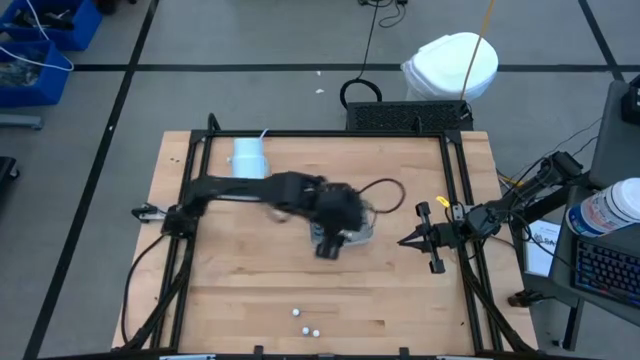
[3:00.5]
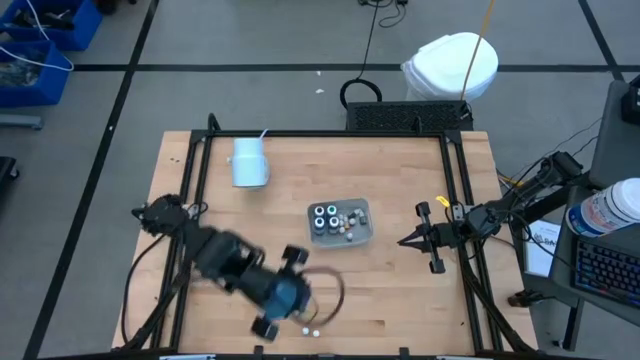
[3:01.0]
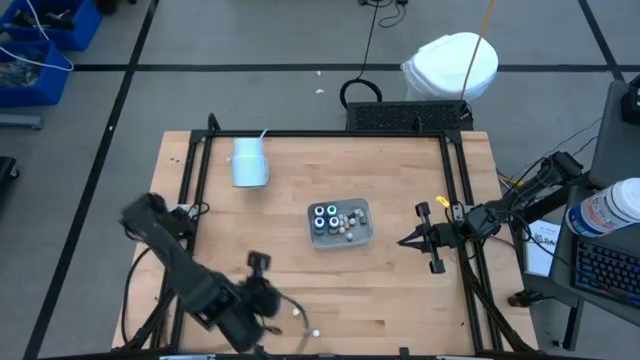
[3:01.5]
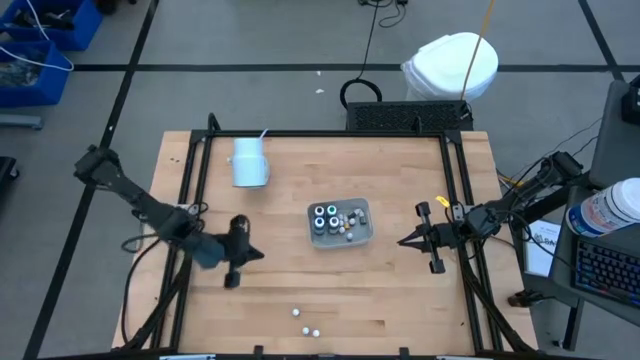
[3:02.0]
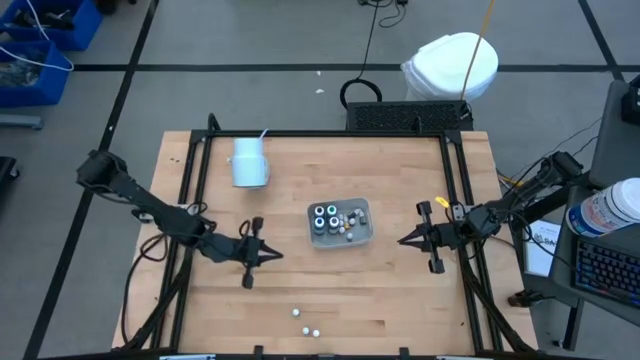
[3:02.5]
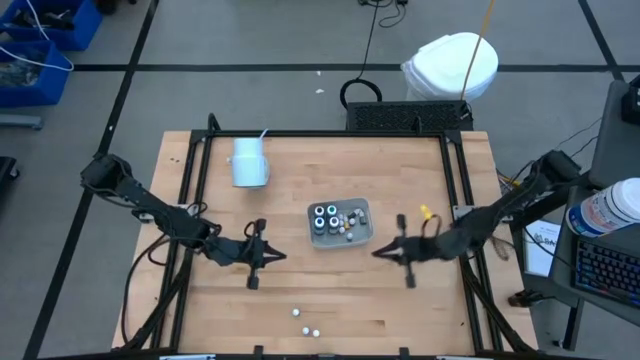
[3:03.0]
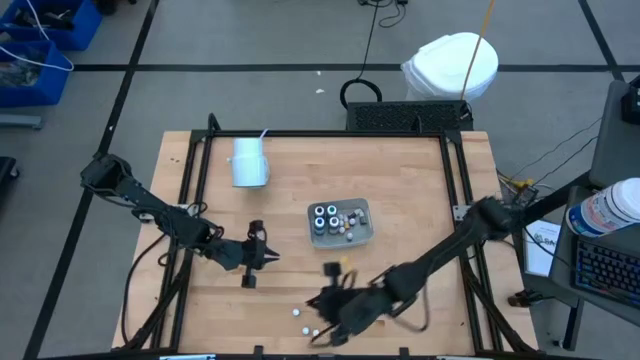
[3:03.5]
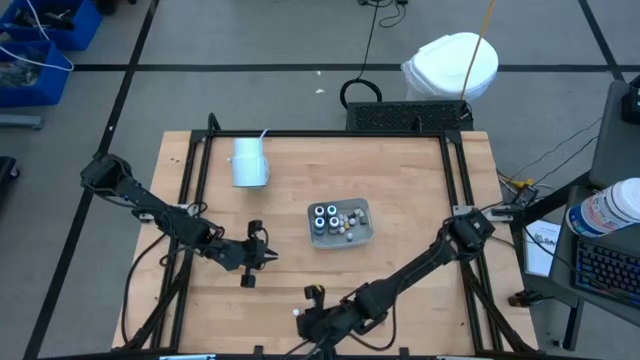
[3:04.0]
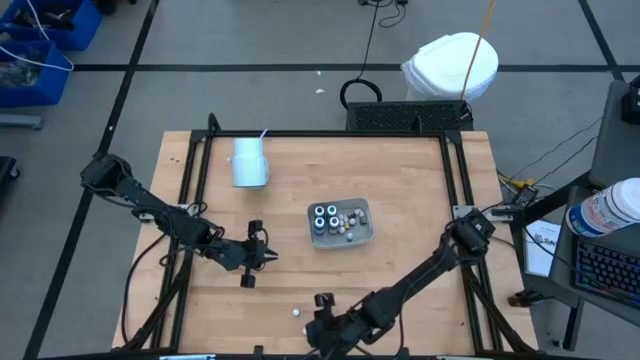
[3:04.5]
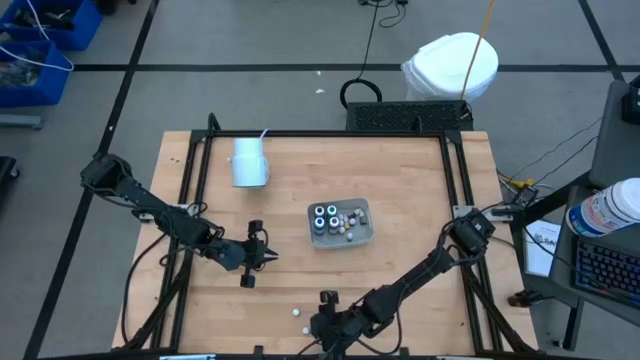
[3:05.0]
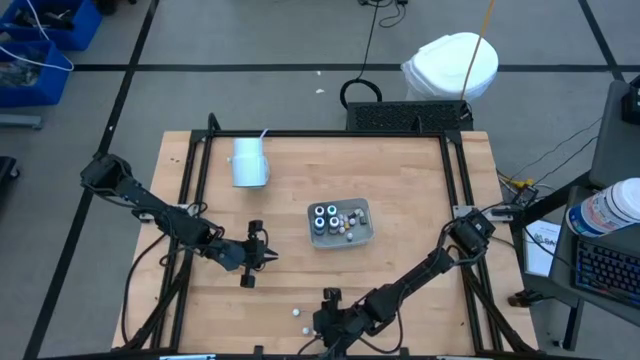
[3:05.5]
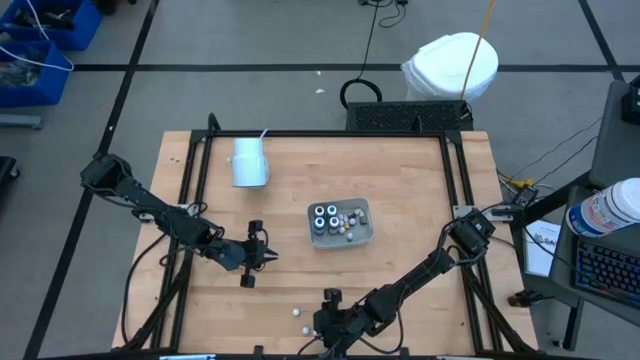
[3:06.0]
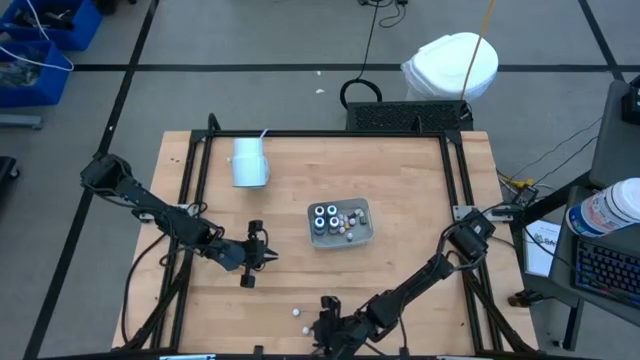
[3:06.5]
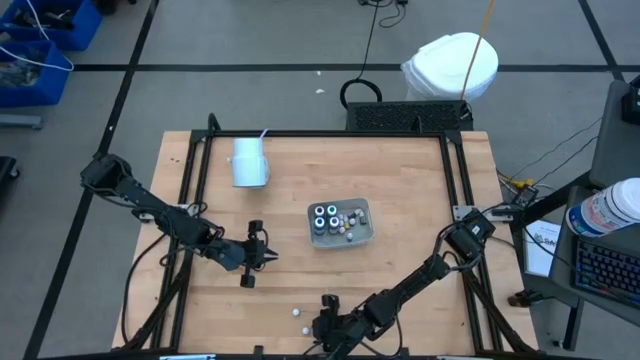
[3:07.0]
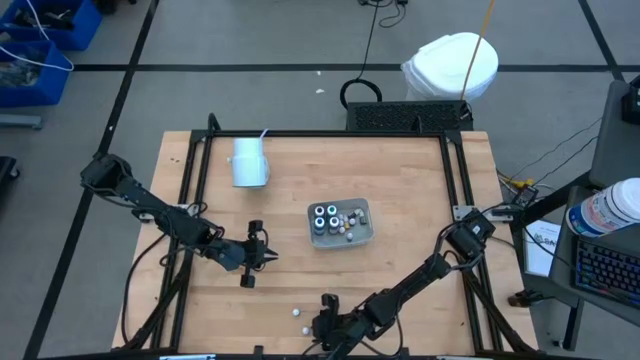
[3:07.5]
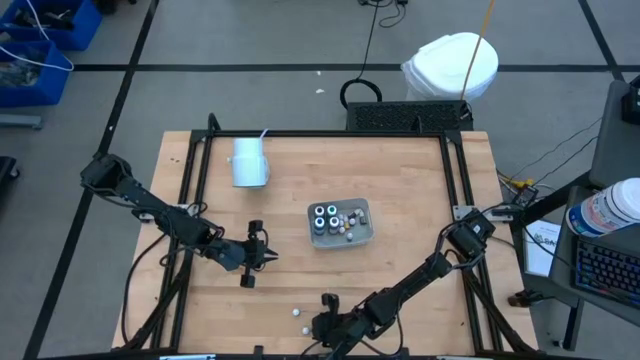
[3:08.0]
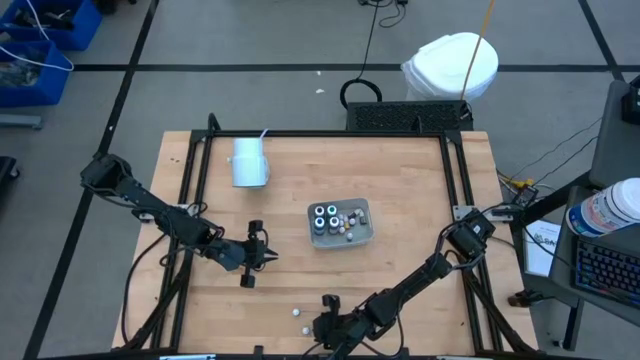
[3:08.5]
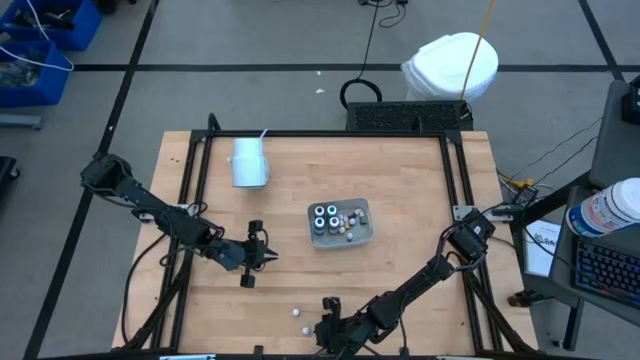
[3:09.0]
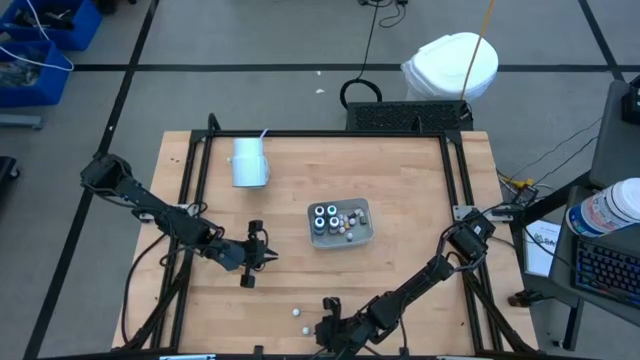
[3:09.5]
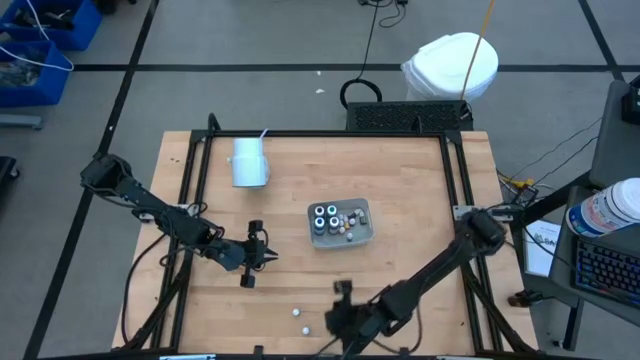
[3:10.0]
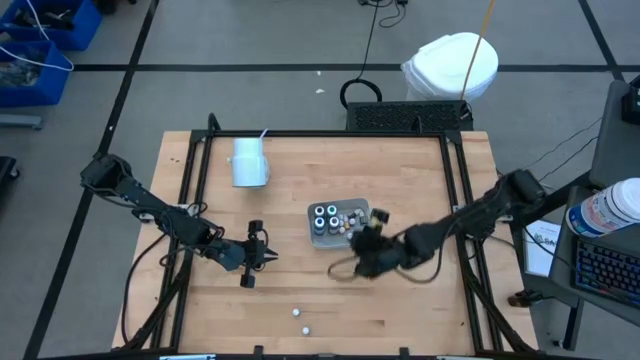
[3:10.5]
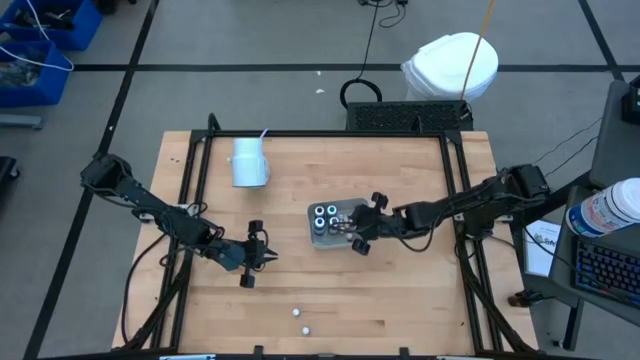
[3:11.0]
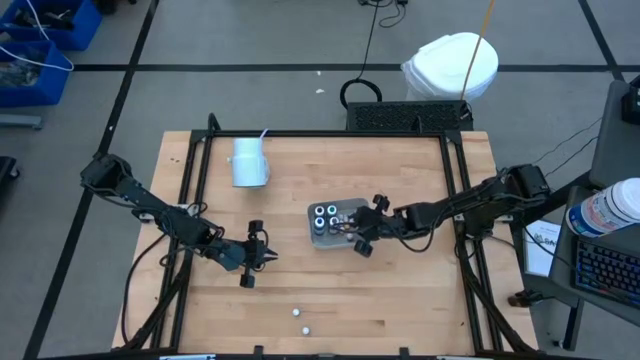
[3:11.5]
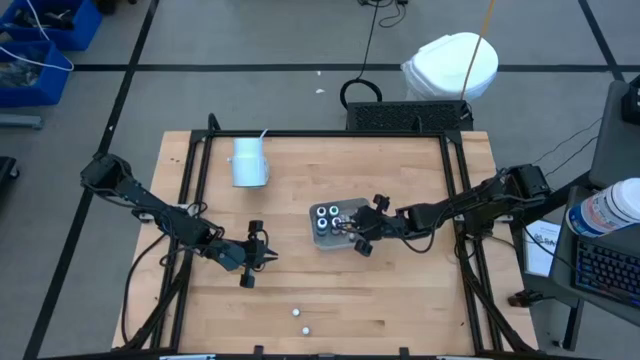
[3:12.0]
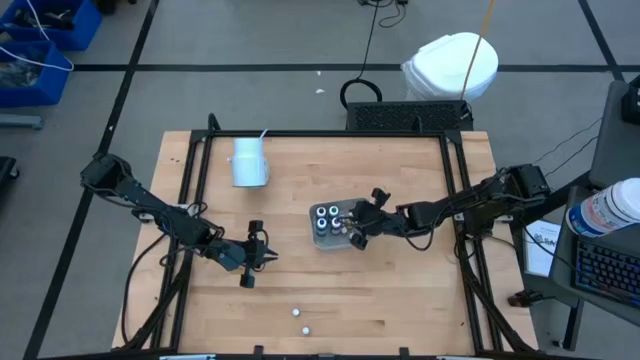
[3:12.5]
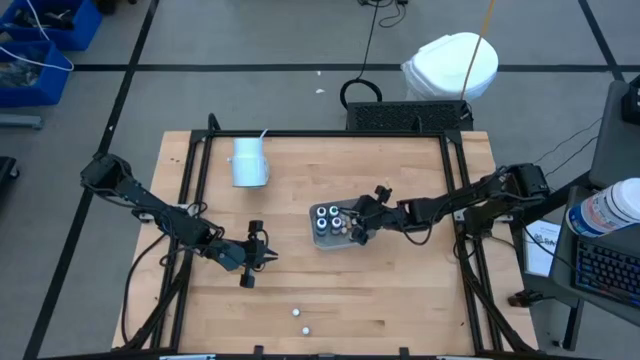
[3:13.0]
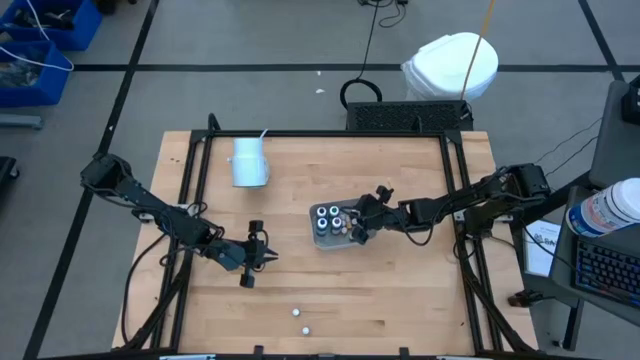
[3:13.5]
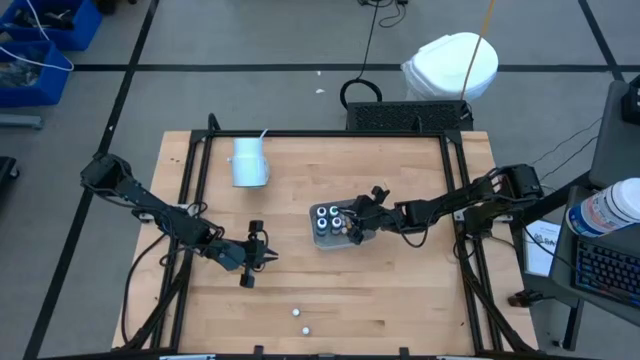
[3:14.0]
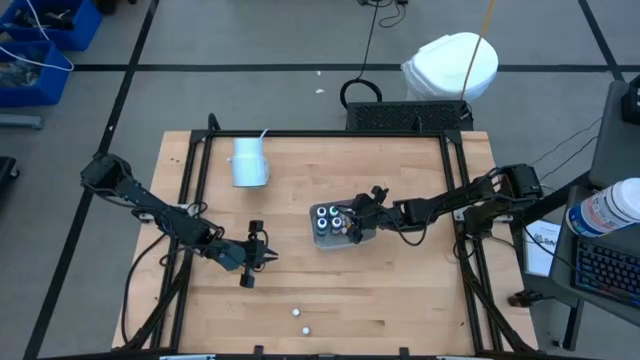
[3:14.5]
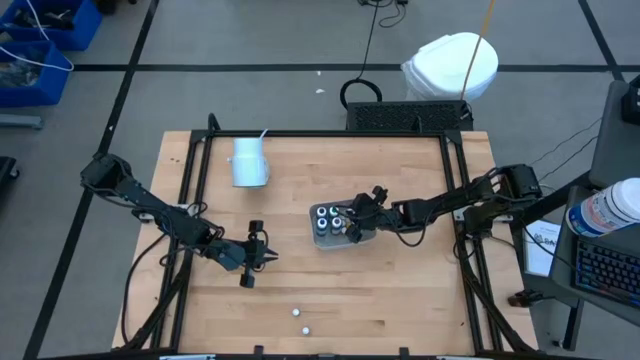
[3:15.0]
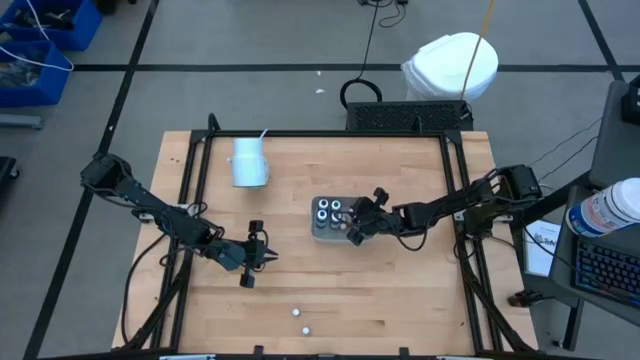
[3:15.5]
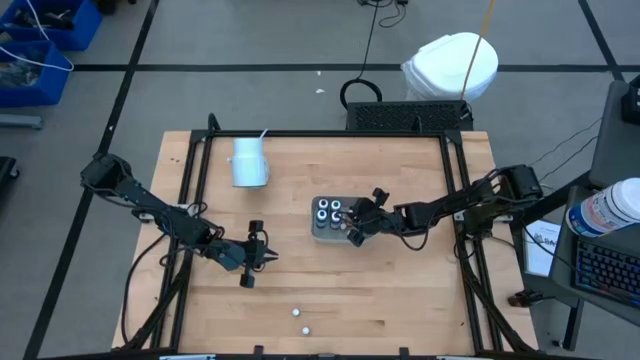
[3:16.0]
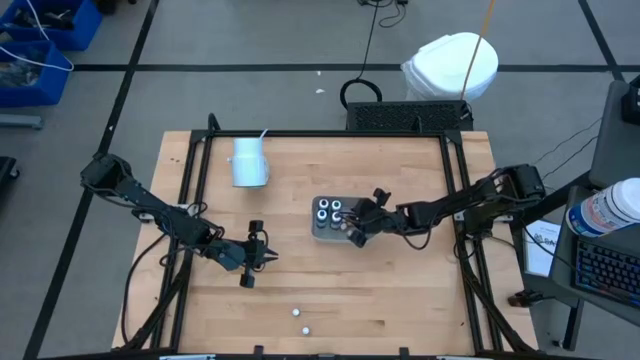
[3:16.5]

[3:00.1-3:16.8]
Task: Pick & Place food coloring
Put the small orange food coloring bottle into the white container

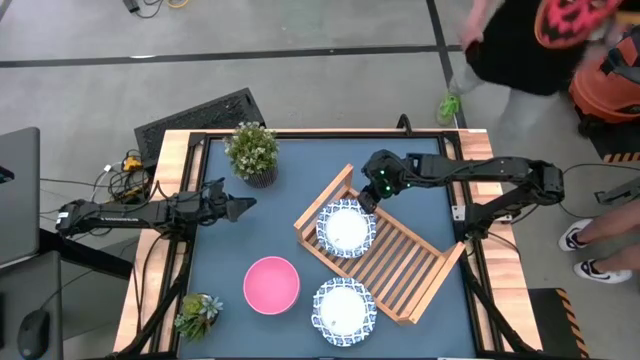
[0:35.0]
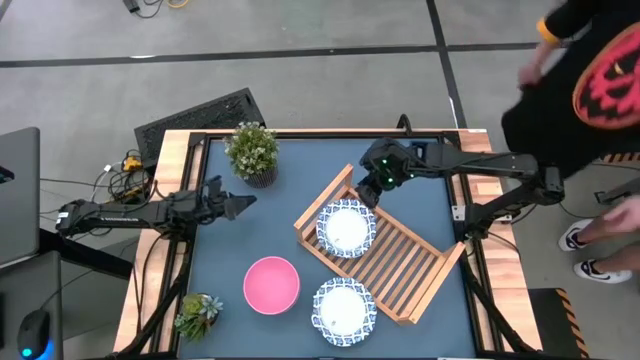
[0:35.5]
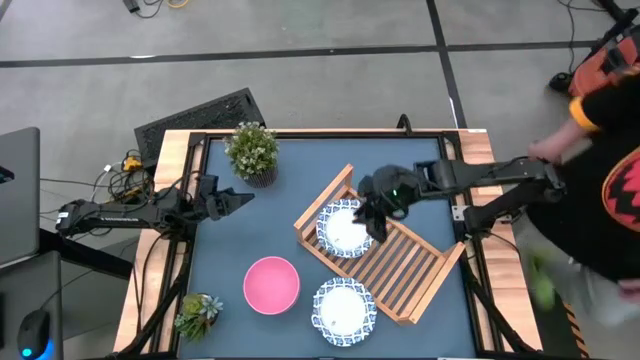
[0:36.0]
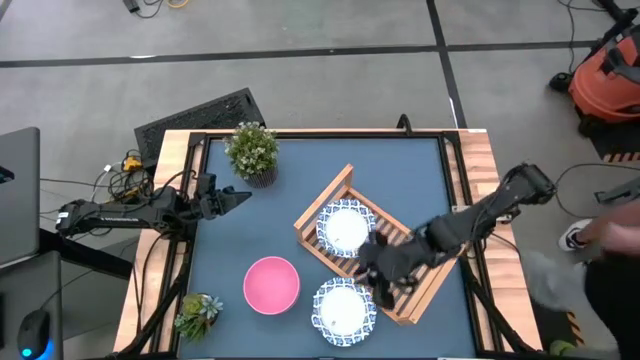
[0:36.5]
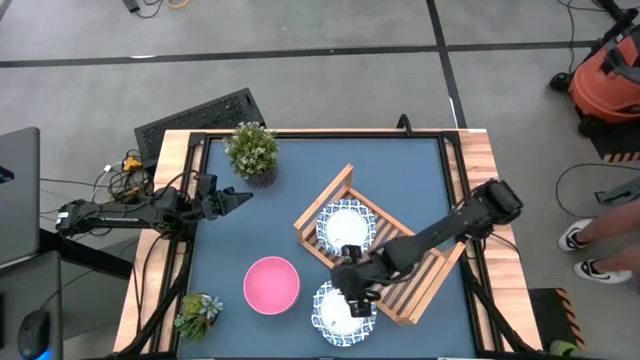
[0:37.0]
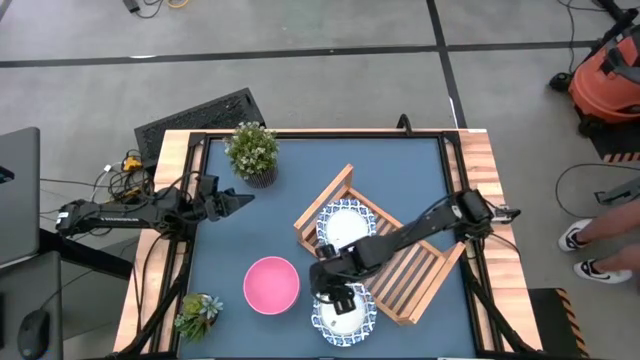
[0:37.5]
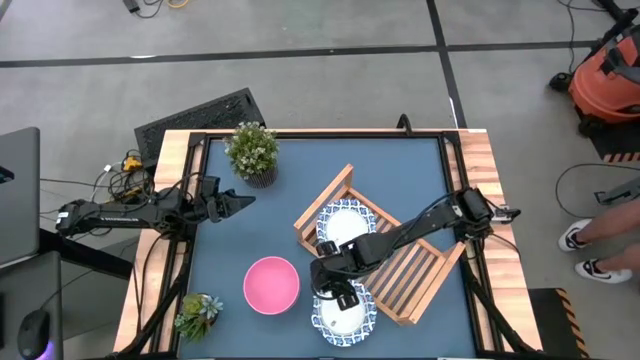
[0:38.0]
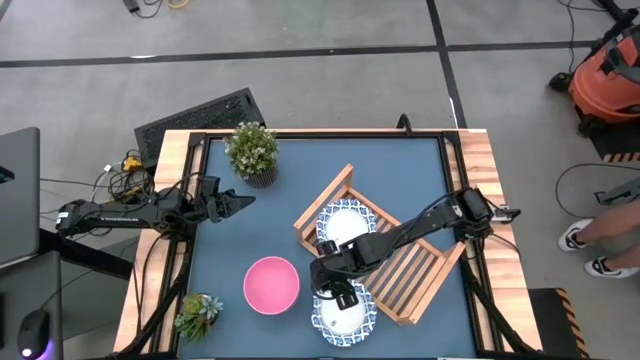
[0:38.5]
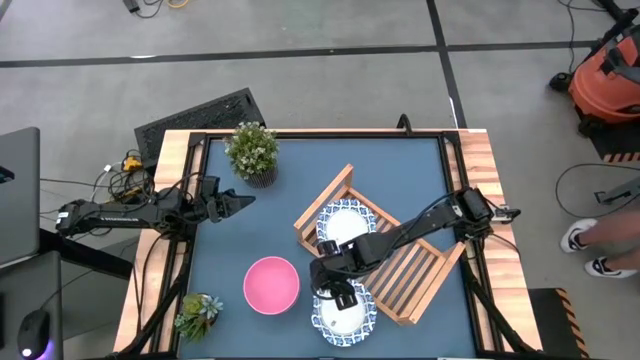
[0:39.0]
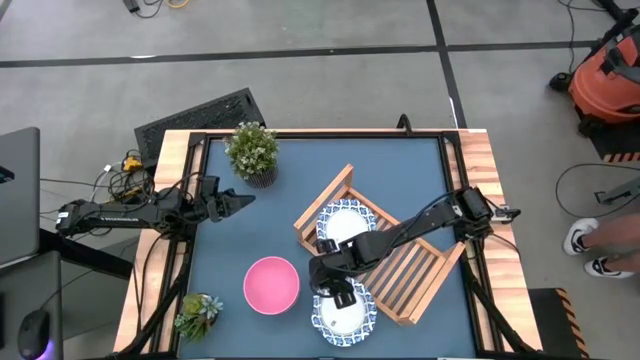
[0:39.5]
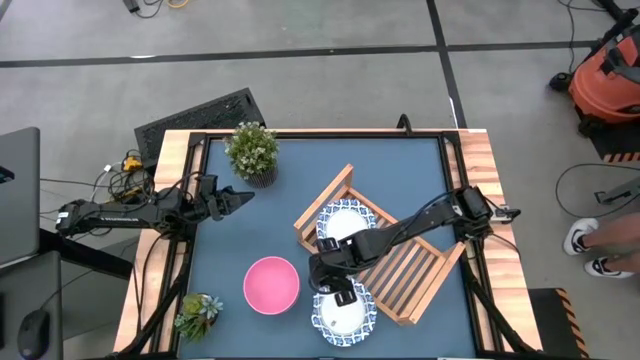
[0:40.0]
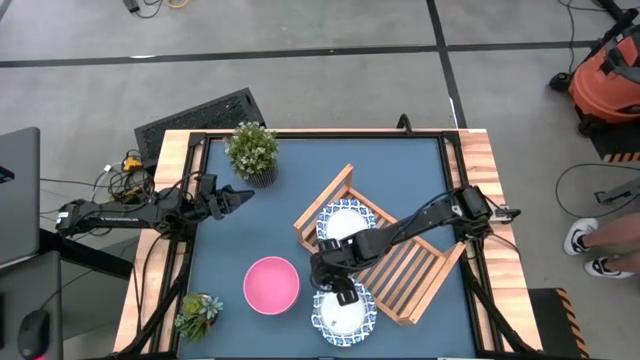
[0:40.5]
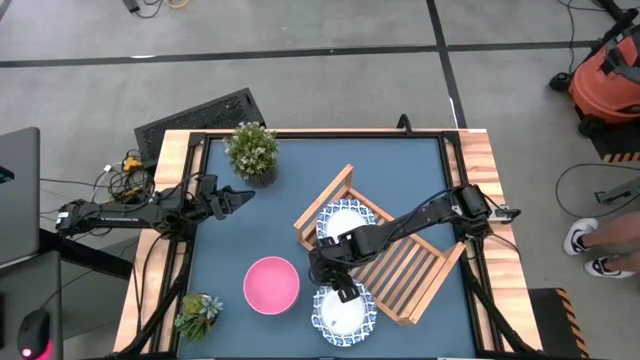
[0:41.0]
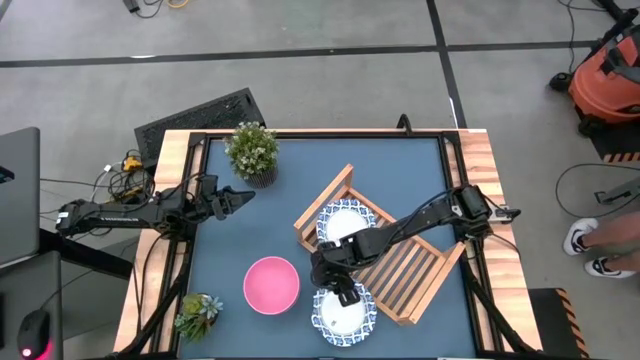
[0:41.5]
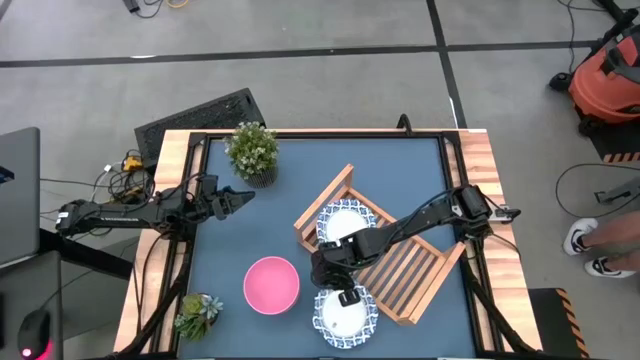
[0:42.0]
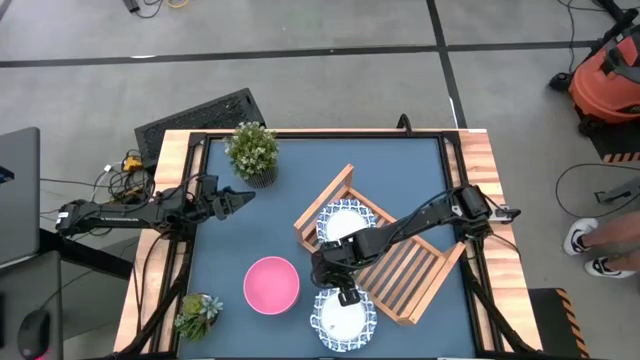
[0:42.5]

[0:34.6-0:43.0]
Task: Place and stack bowls onto a shelf
Stack the blue patterned bowl on the top of the blue patterned bowl on the shelf
